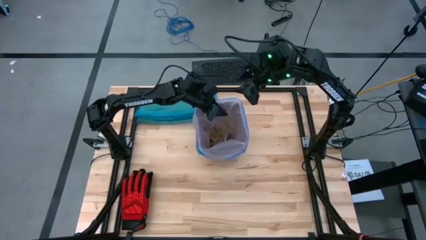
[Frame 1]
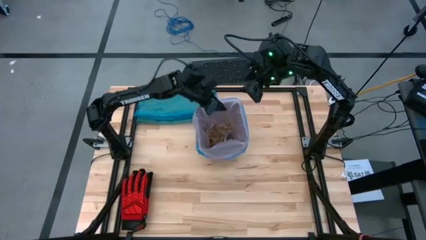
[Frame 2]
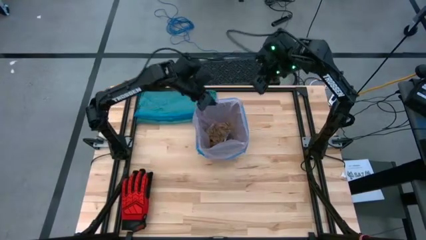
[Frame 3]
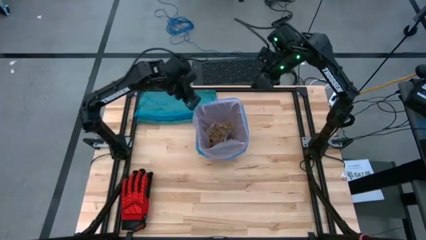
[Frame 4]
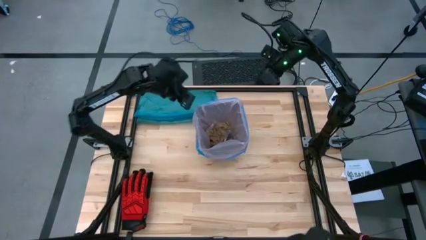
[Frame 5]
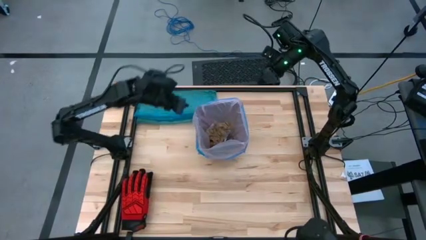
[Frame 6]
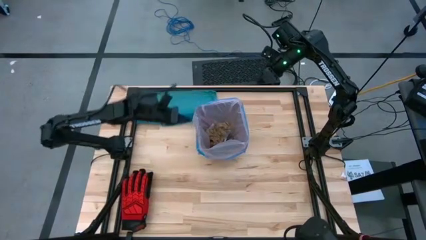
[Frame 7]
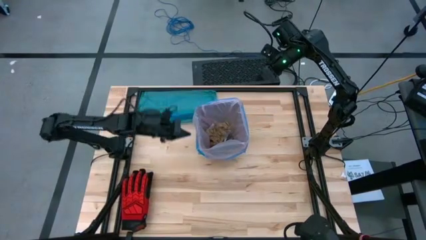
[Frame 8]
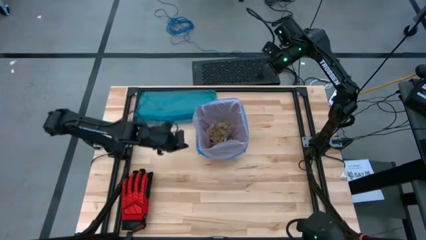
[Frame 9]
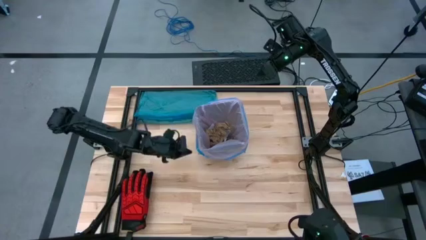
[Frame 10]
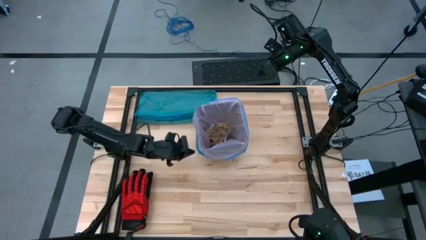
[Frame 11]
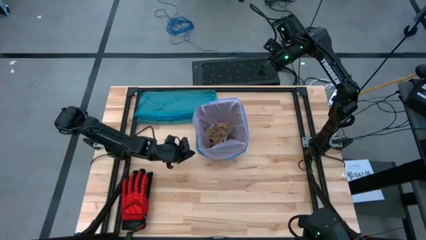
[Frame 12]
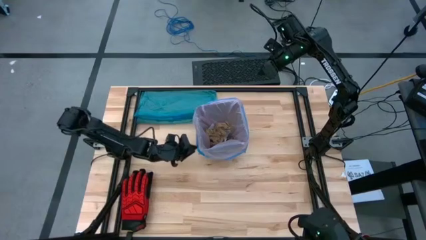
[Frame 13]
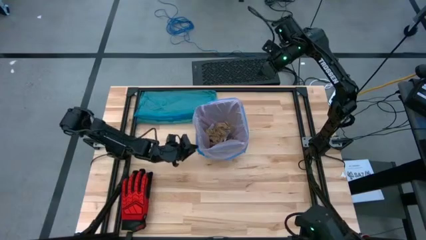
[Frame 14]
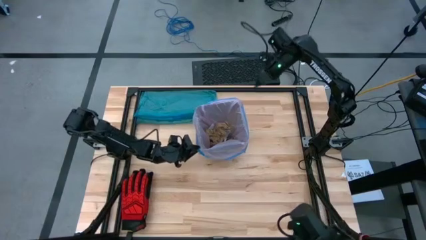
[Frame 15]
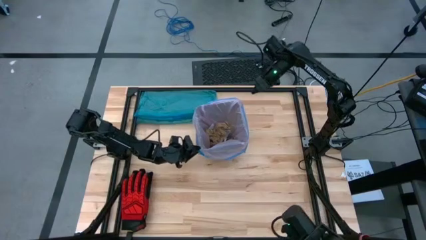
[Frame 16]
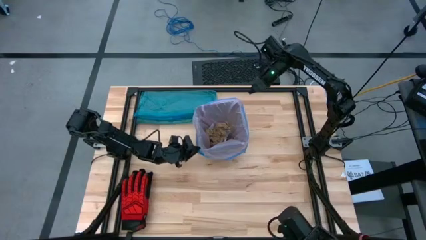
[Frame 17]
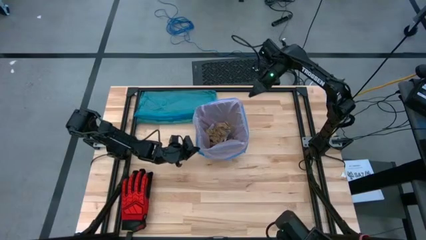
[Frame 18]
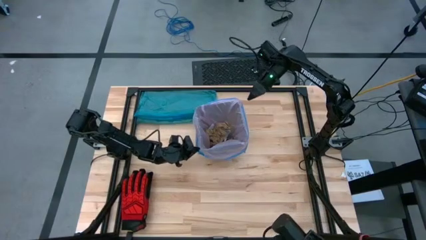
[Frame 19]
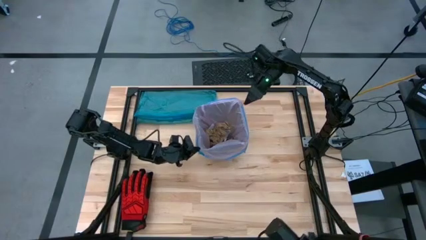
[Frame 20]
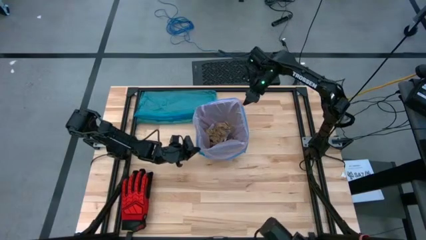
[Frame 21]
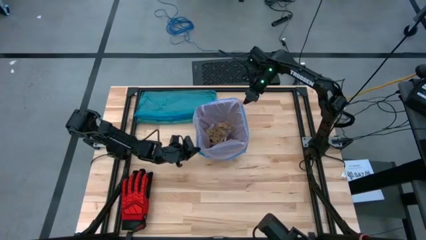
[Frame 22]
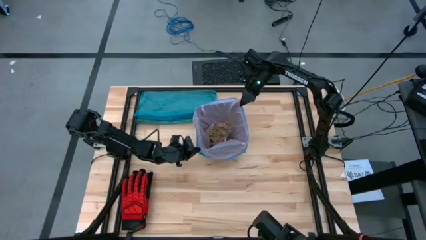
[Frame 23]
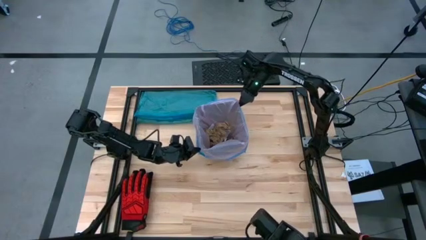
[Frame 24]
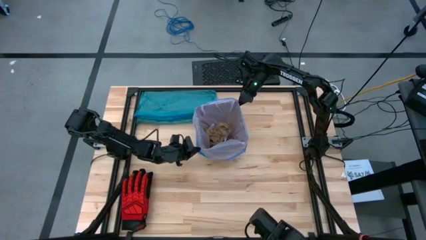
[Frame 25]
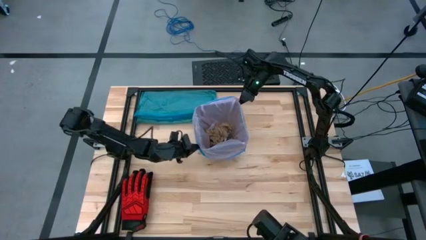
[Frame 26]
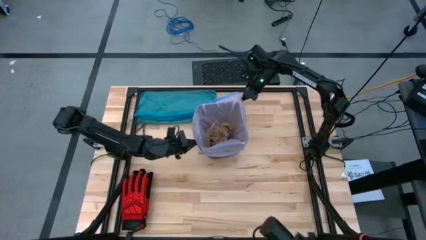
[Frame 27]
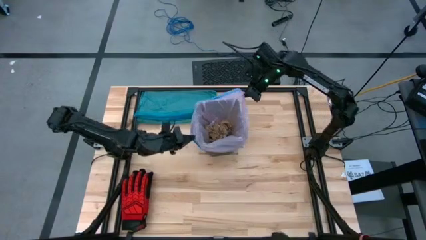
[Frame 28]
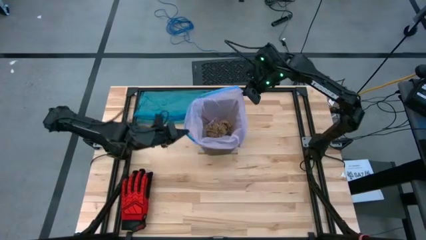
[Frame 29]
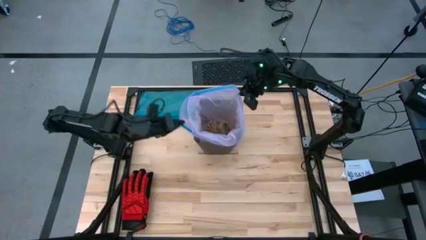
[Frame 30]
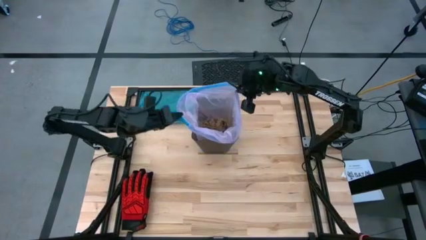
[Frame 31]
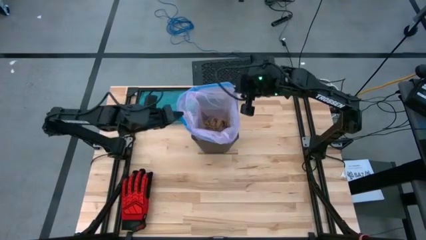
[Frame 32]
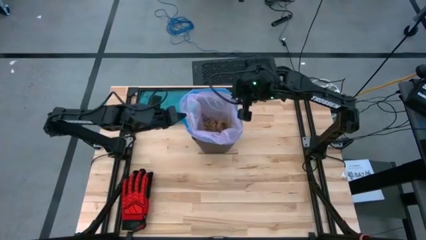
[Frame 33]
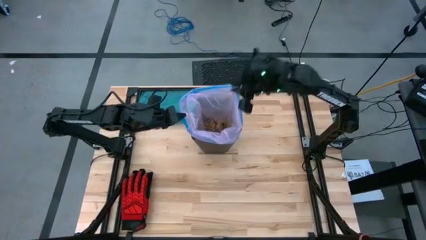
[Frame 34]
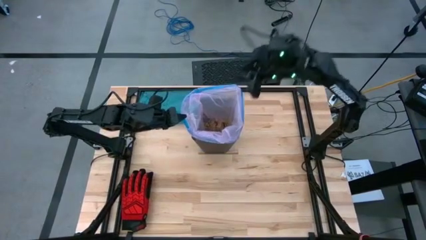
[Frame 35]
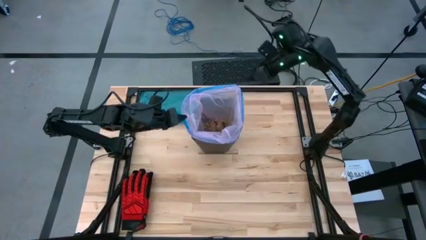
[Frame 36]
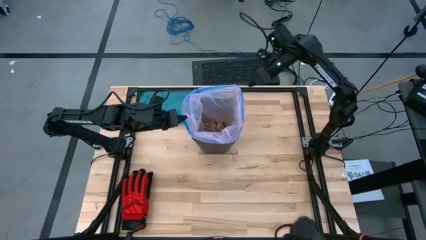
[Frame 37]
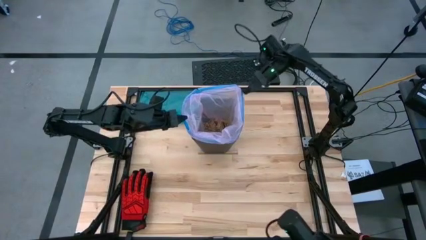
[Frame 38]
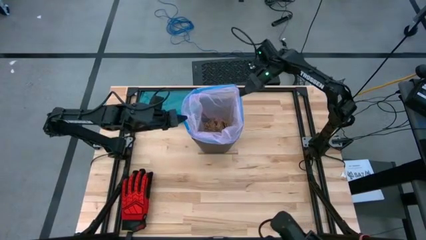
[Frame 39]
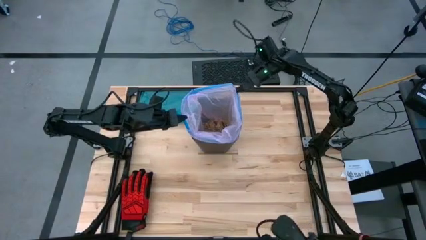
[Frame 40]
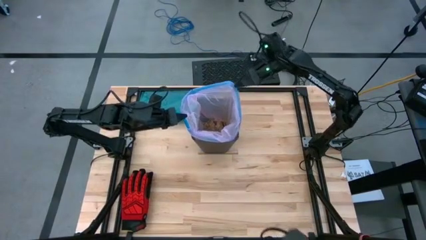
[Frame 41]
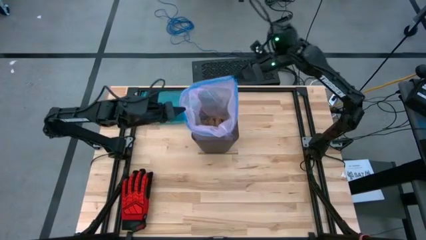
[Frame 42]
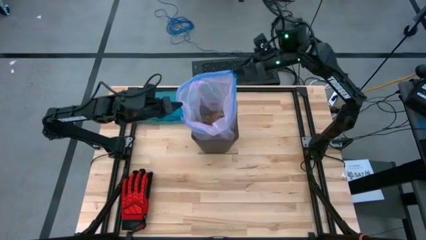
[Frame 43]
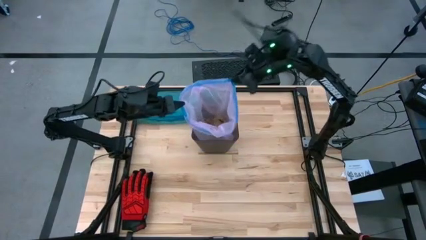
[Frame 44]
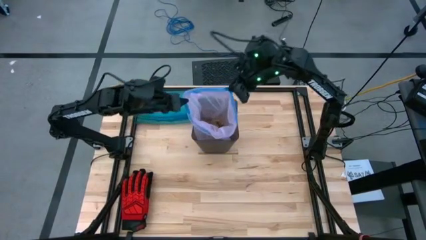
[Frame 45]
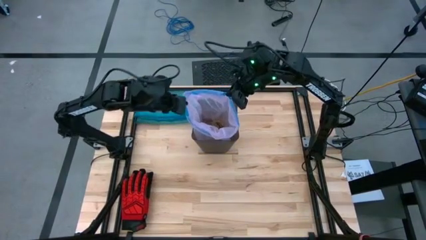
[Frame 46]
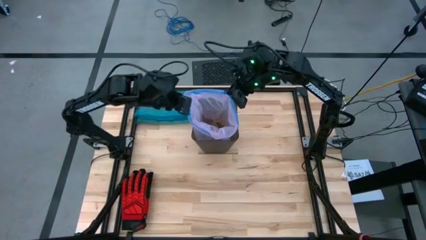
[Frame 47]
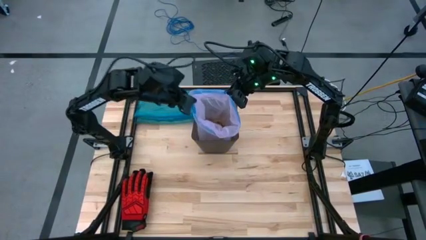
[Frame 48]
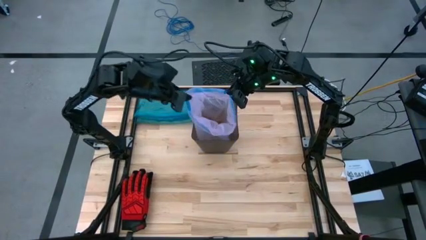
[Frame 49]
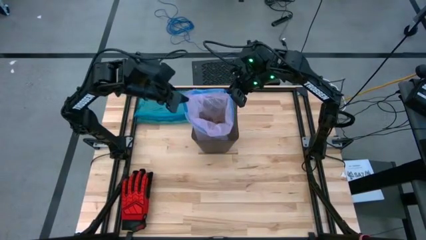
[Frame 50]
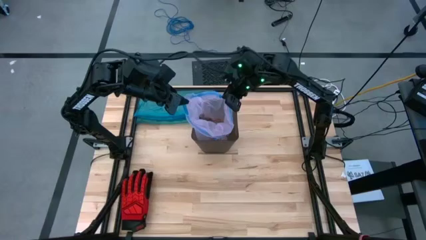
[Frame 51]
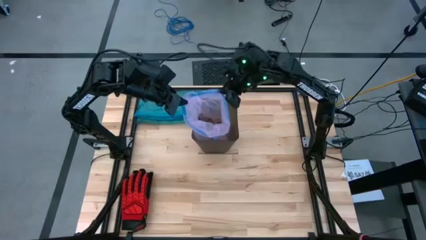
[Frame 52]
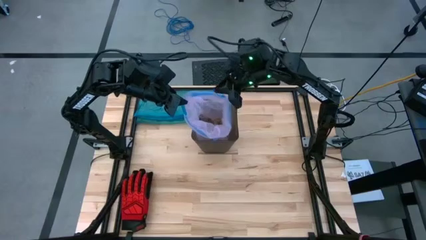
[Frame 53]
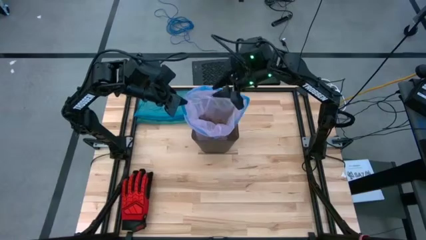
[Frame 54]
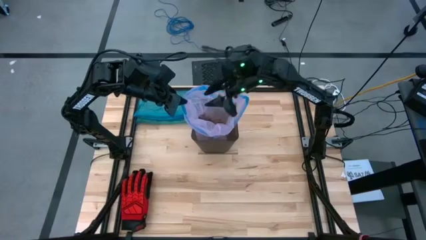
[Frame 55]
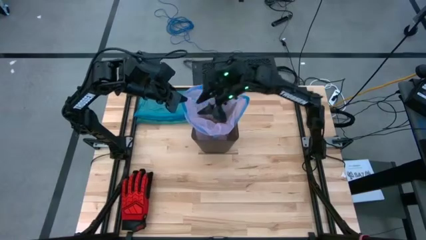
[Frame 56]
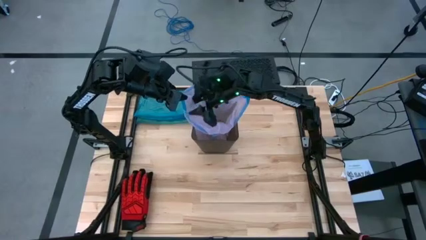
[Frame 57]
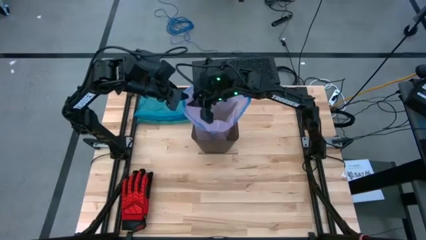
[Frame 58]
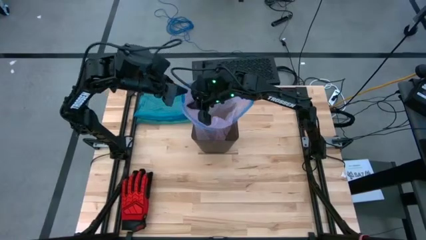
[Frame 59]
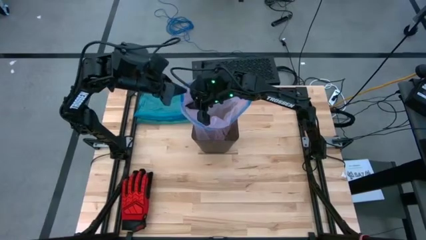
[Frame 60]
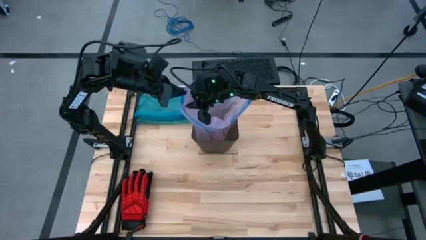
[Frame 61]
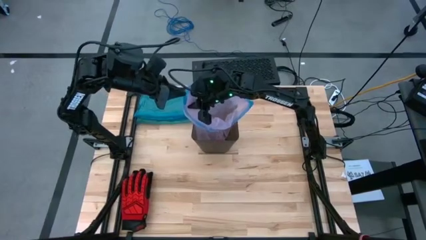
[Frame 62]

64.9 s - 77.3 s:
Task: place trash/remove bag and relplace
Close the pink trash bag
